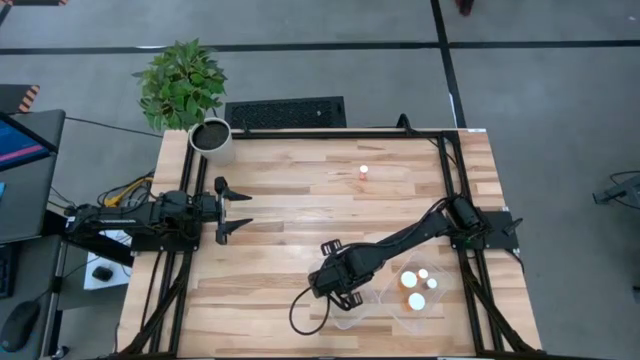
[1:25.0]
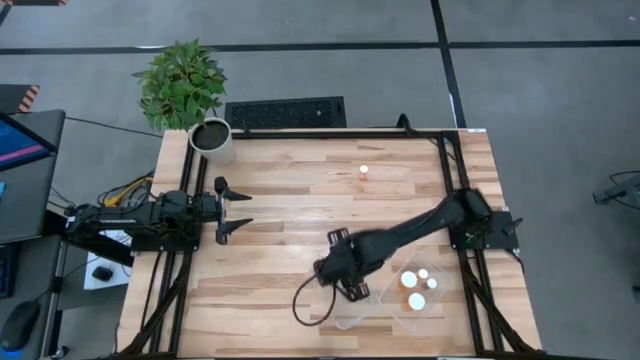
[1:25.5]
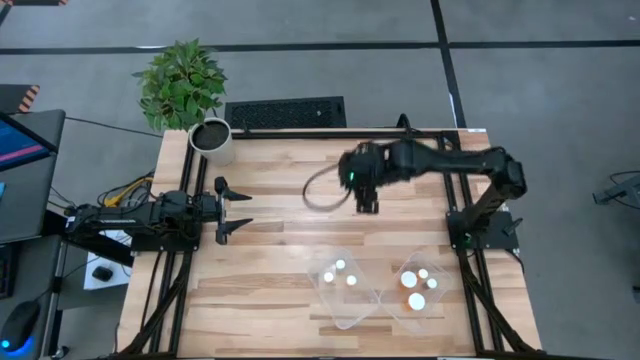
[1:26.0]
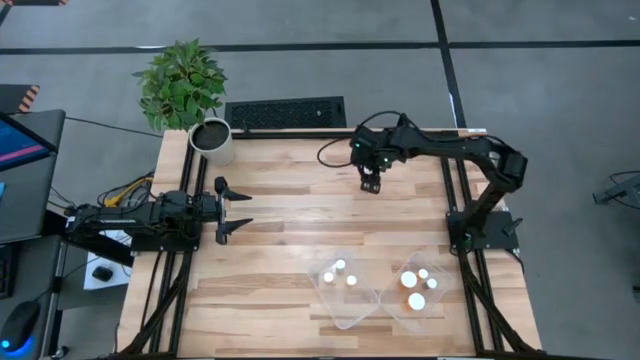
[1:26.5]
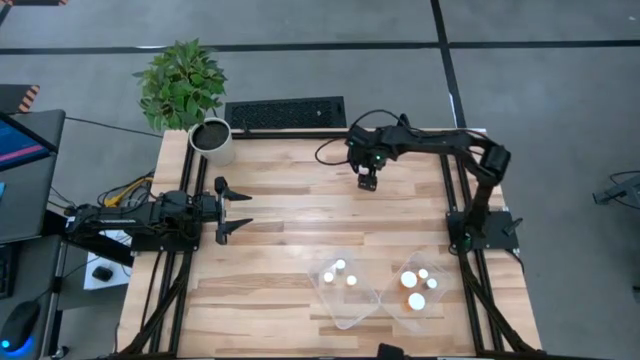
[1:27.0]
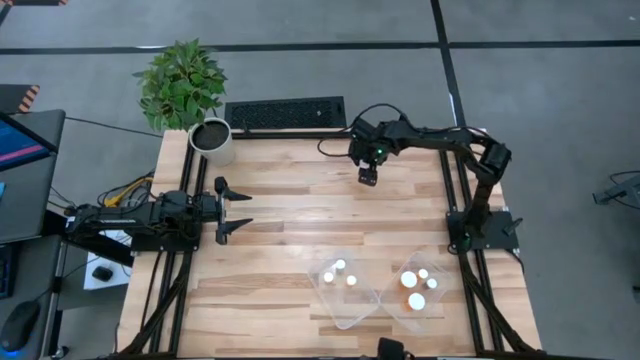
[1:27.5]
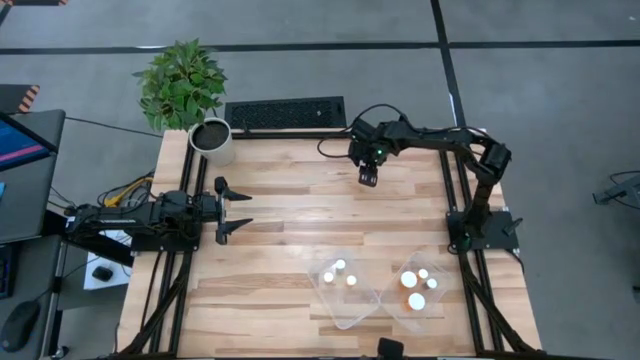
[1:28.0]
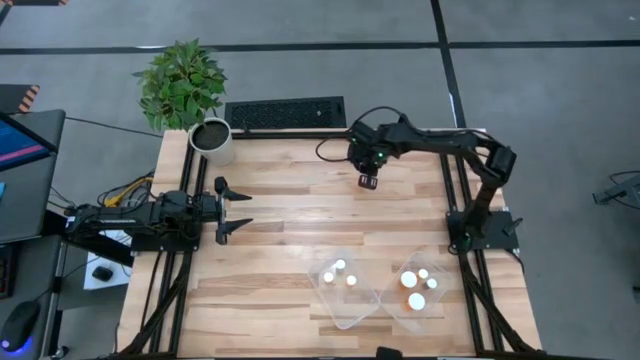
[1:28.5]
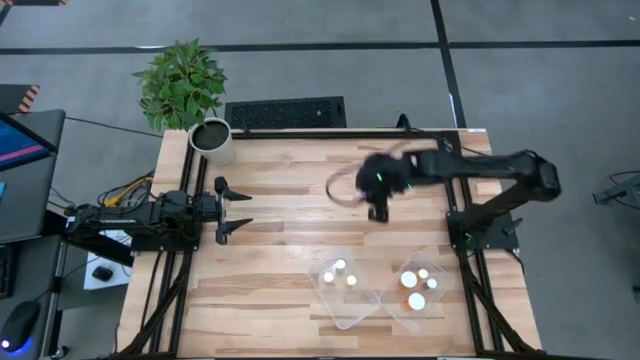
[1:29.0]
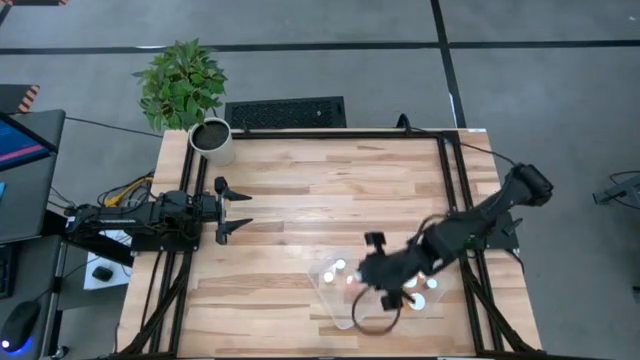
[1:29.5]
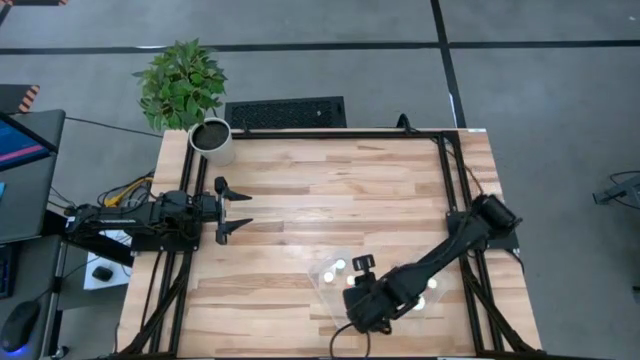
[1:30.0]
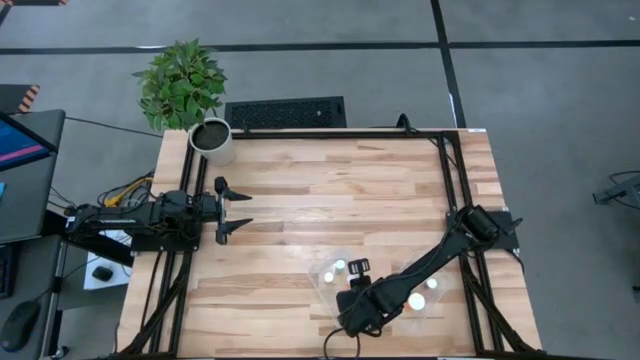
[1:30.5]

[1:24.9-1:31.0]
Task: Pick and place medicine bottles into bin by pill shape (circle, oval)
Put the pink pill bottle into the left transparent bin

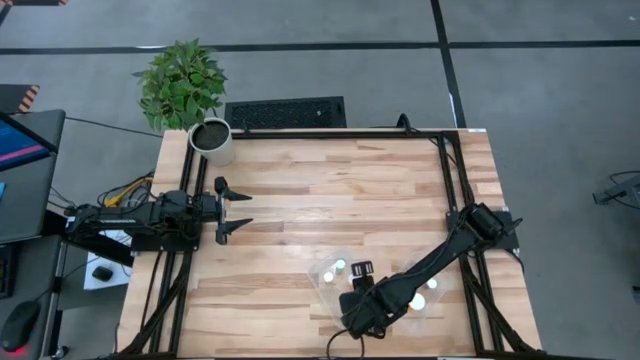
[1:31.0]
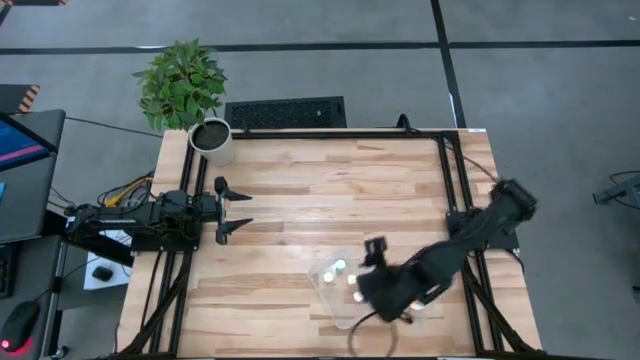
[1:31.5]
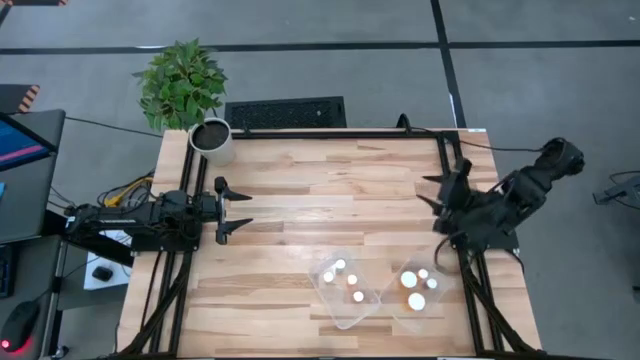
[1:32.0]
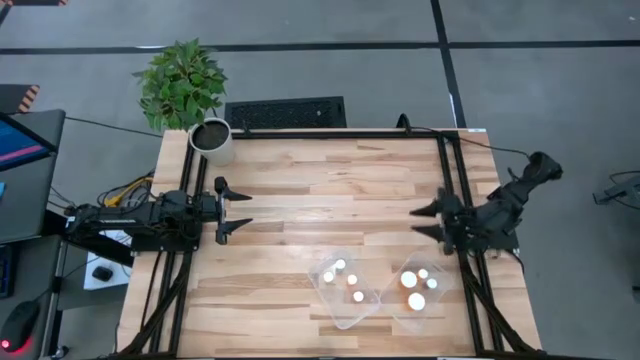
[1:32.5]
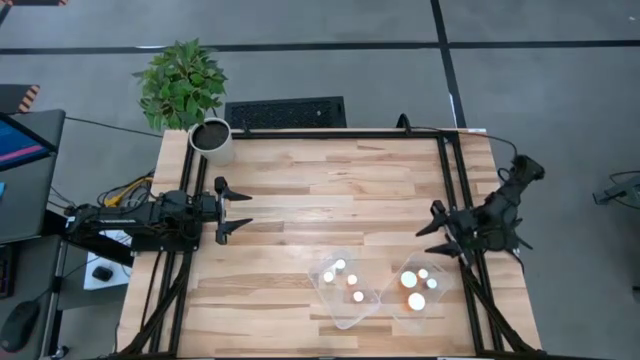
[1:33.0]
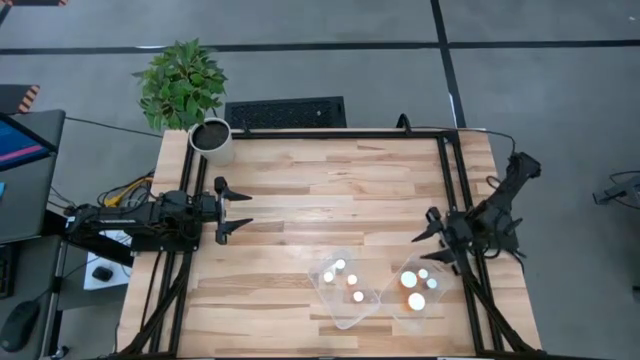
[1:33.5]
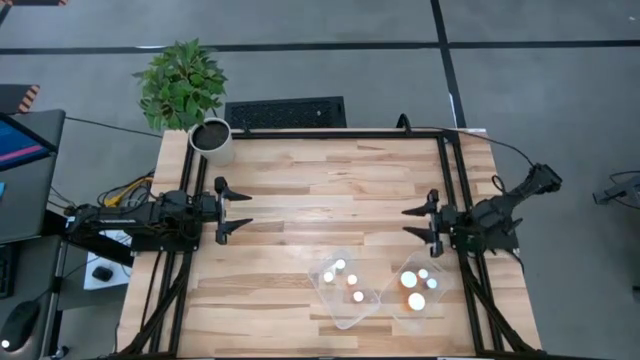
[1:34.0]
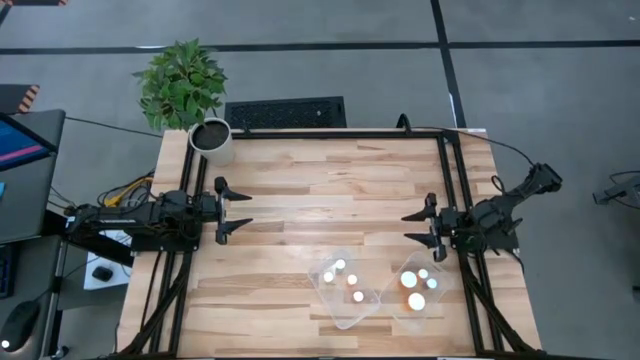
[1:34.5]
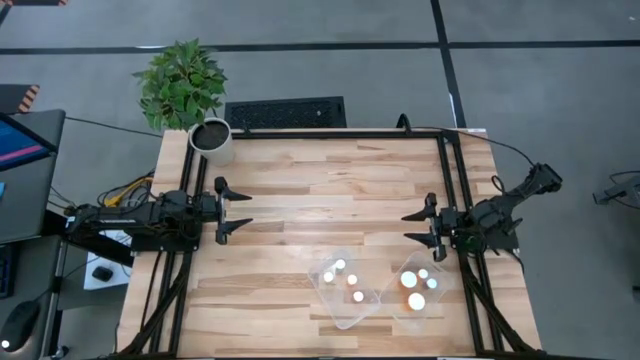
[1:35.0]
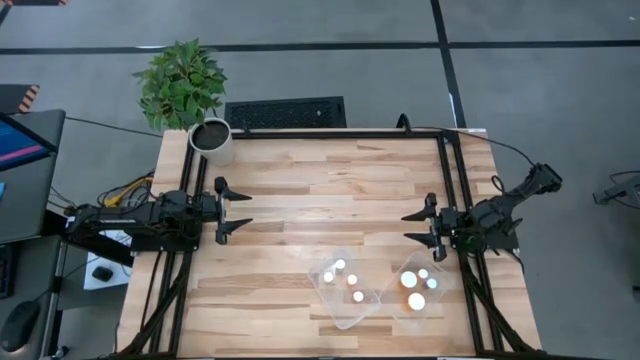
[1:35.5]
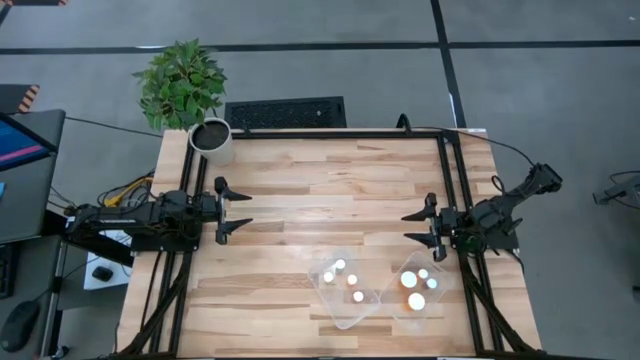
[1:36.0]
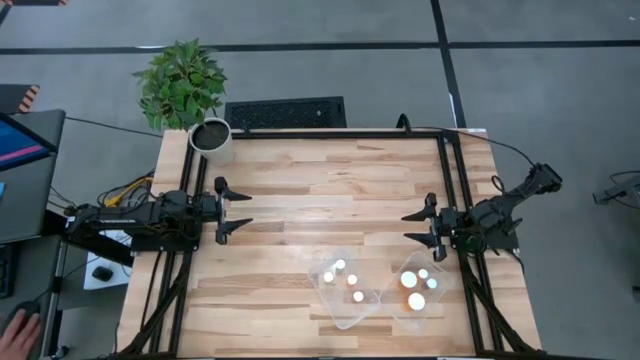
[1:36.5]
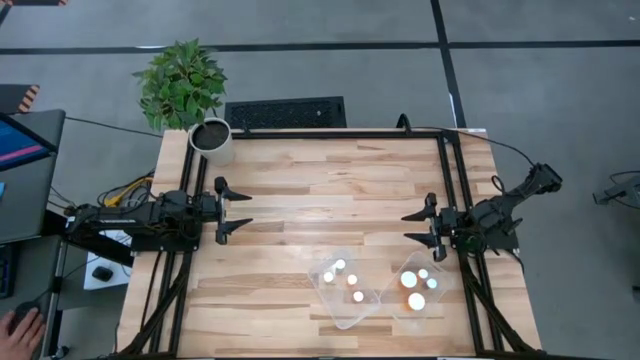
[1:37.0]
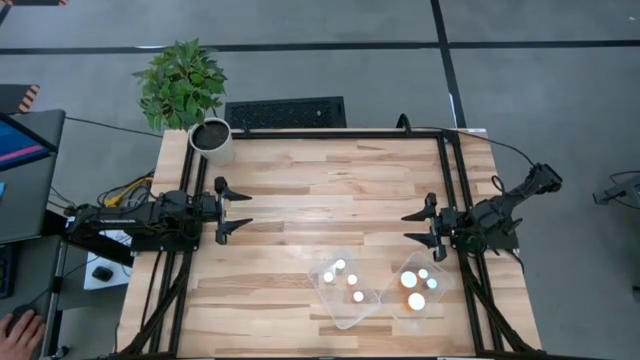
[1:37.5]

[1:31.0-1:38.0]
Return to Home Position

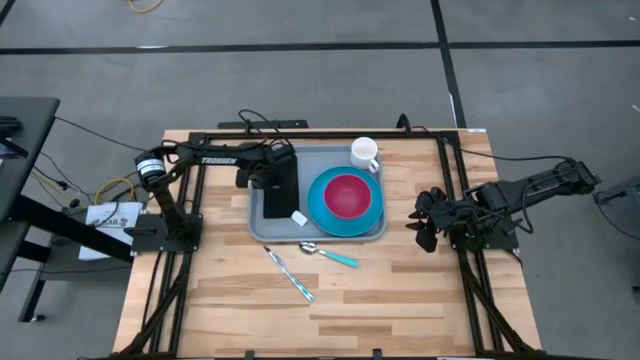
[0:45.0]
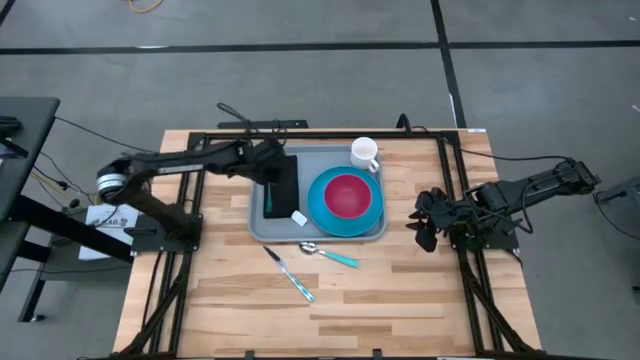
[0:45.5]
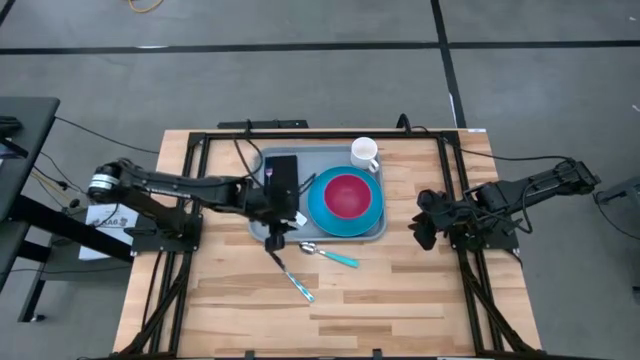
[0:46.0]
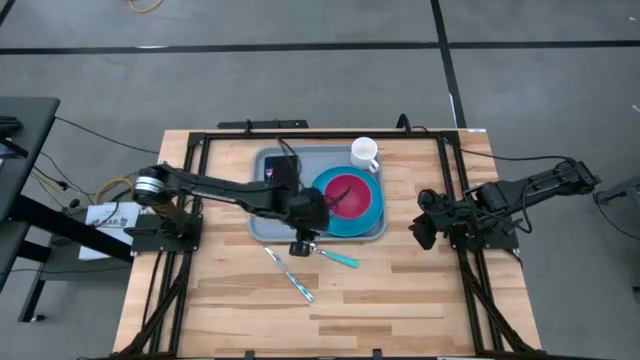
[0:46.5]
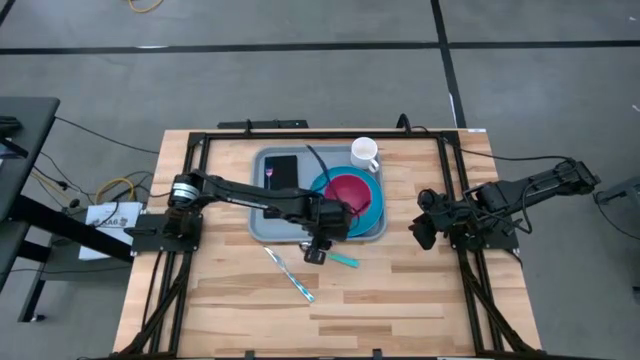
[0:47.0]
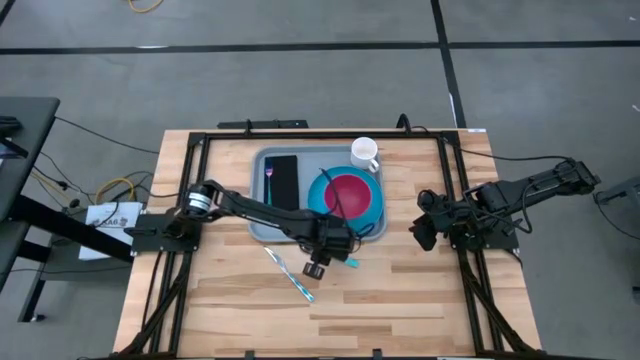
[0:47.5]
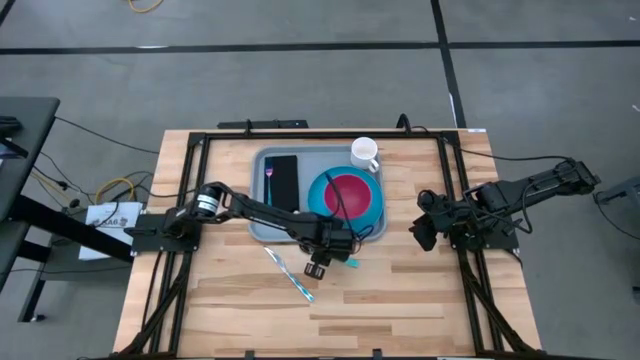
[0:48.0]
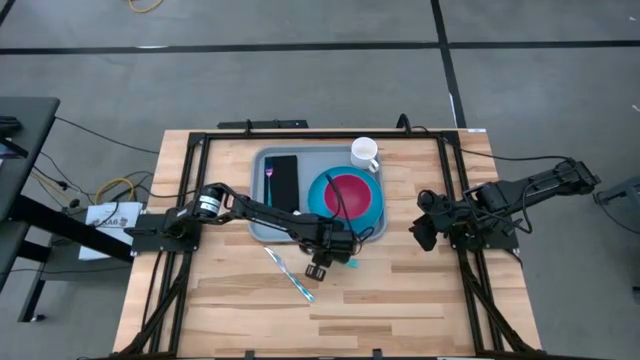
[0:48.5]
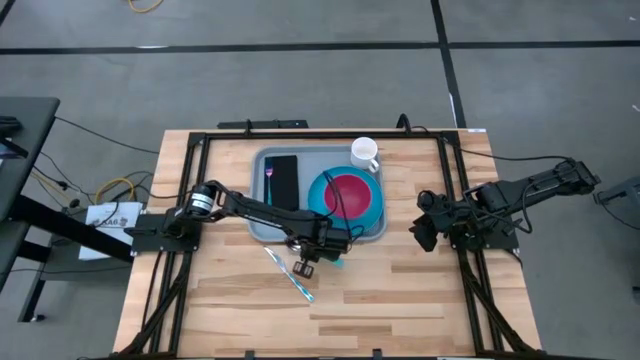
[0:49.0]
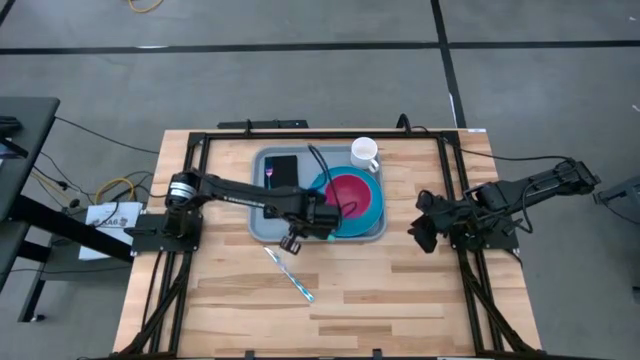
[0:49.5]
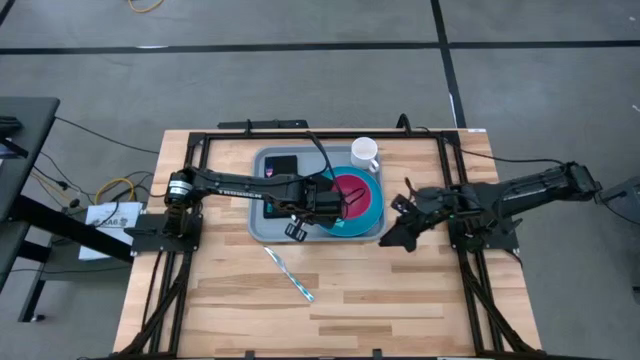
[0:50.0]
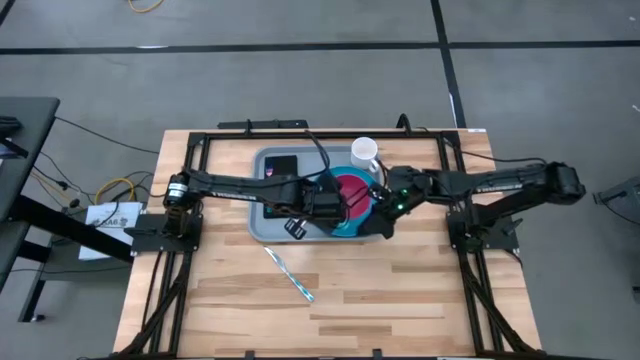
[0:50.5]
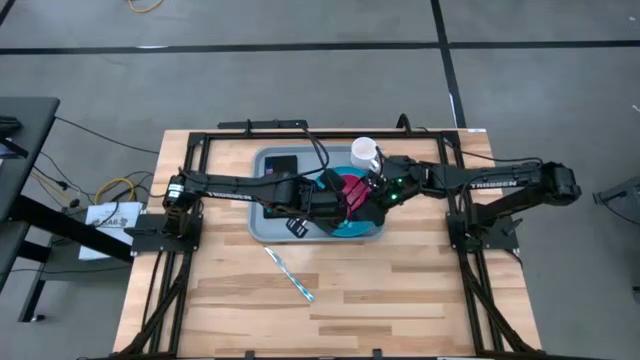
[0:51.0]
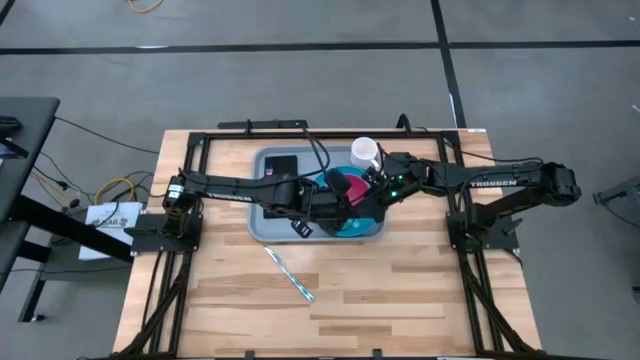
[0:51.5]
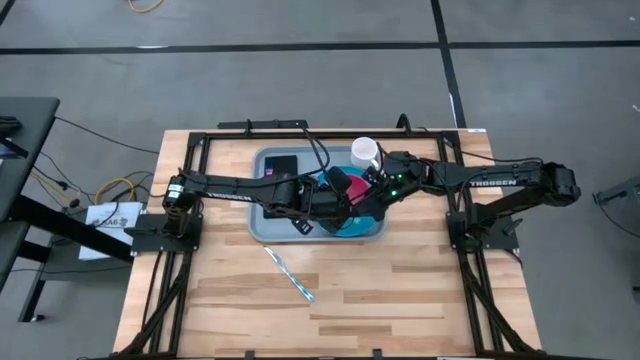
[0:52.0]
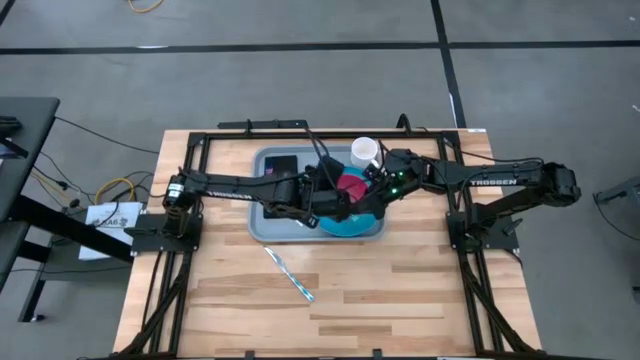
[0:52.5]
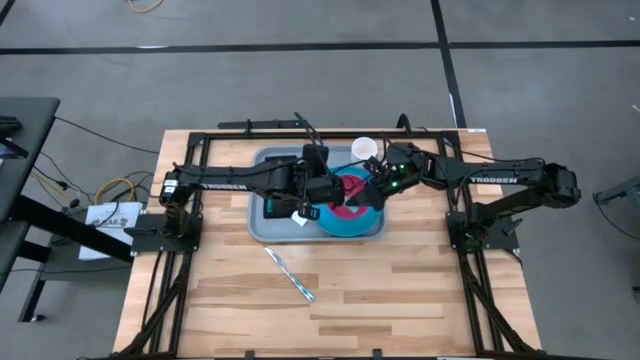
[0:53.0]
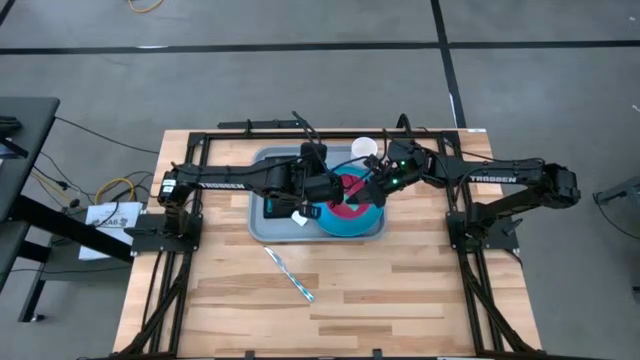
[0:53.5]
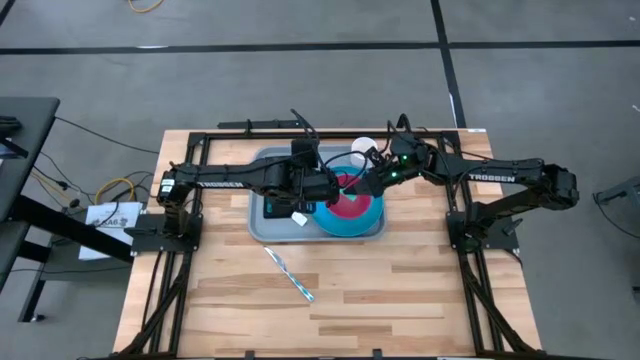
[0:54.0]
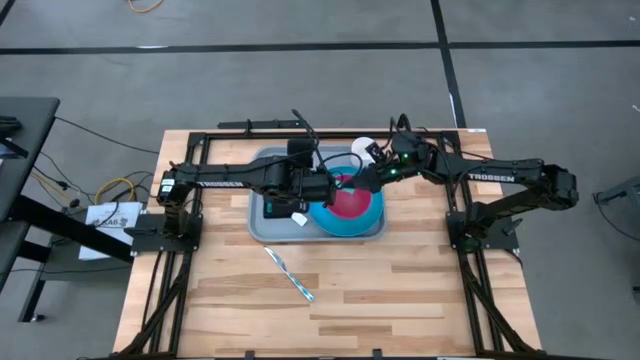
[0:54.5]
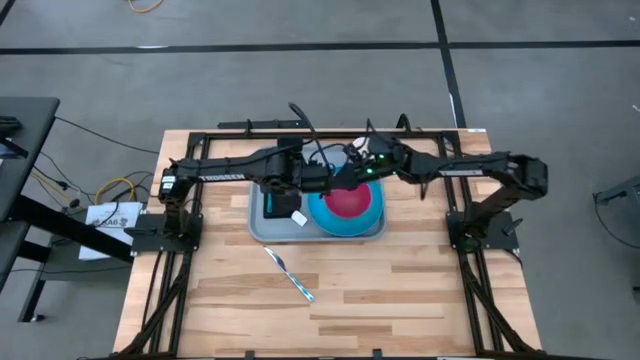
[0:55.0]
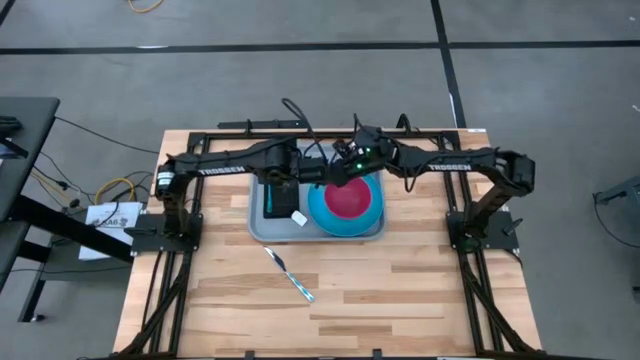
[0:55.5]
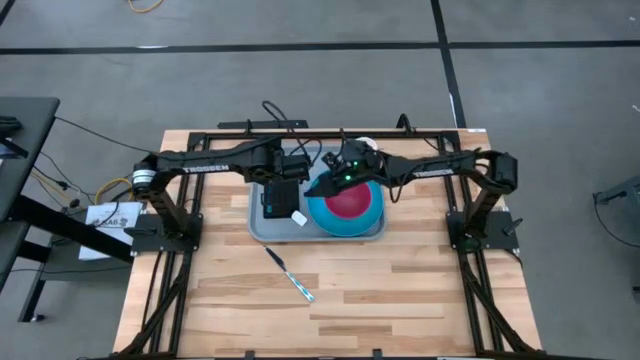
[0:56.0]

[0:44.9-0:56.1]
Task: Set up tray
Put the blue spoon to the right of the blue fork on the black napkin on the gray serving tray
